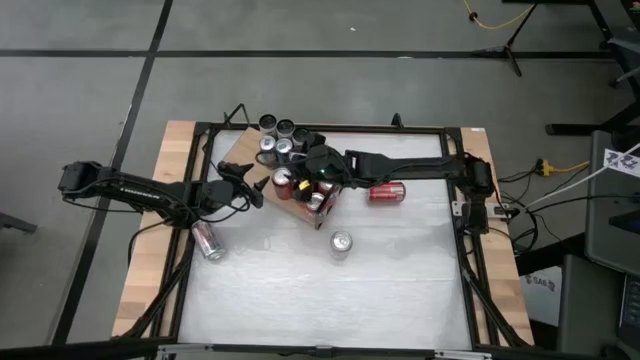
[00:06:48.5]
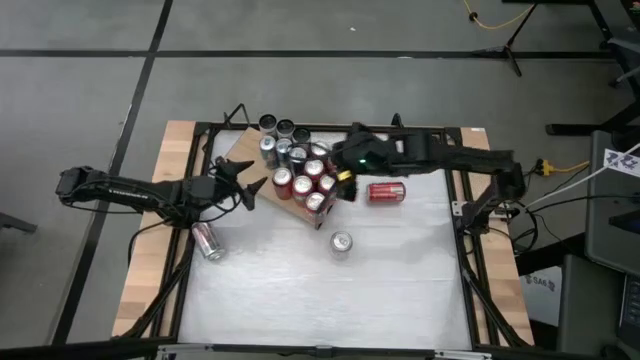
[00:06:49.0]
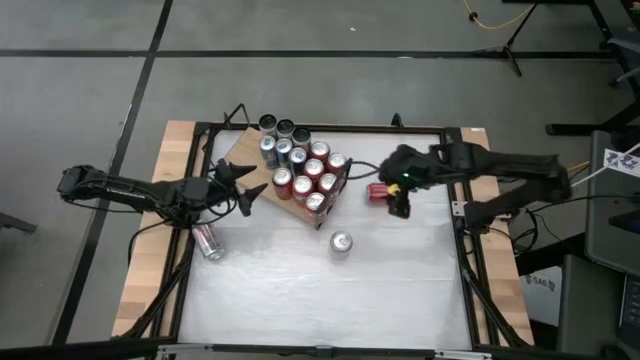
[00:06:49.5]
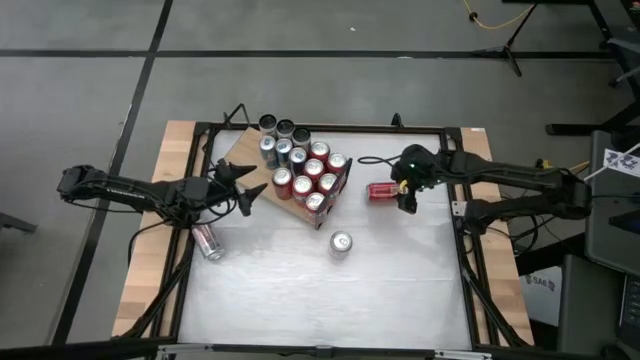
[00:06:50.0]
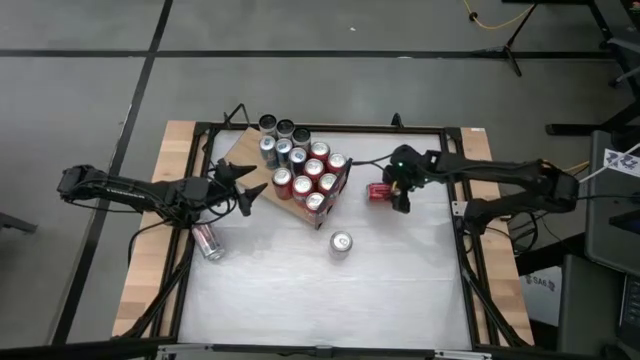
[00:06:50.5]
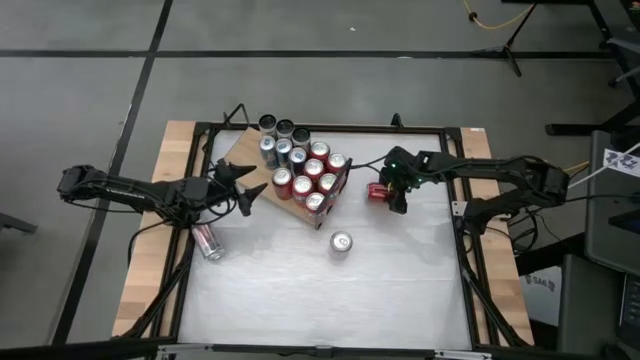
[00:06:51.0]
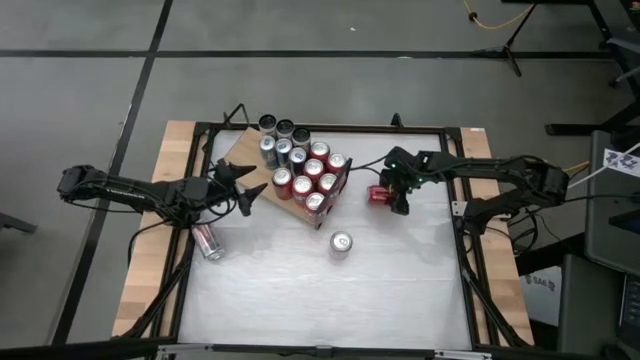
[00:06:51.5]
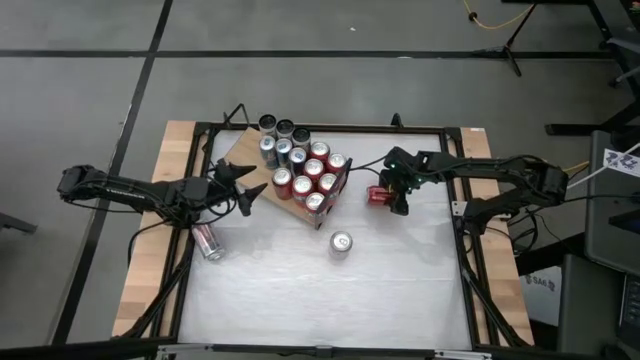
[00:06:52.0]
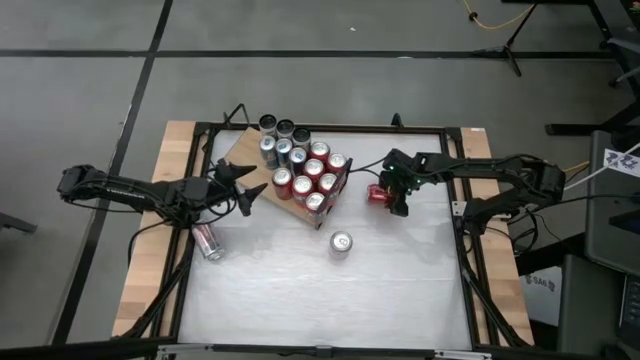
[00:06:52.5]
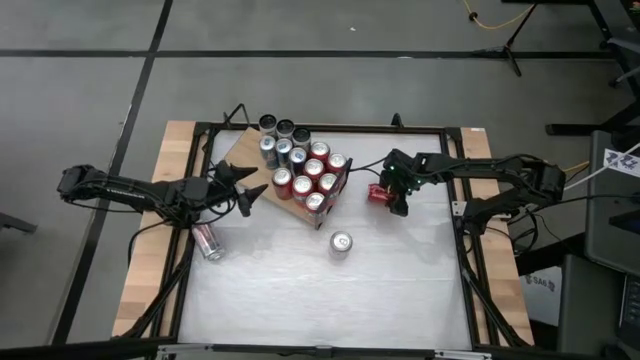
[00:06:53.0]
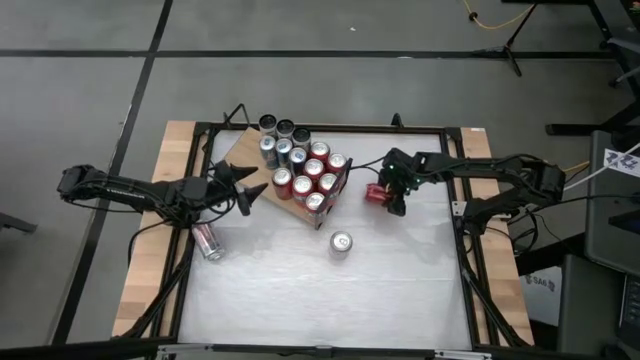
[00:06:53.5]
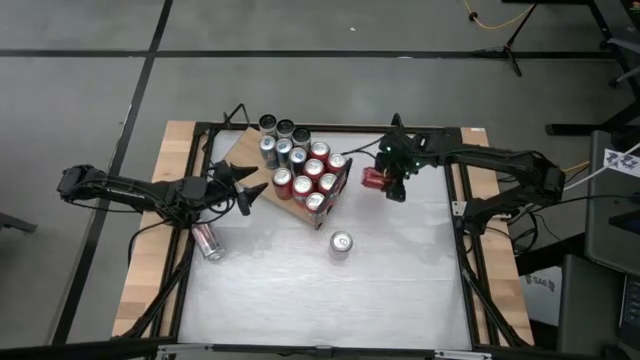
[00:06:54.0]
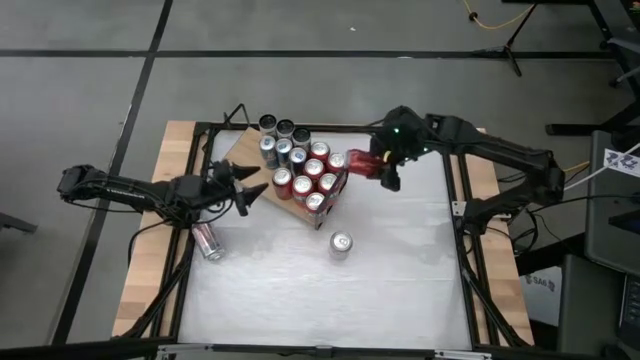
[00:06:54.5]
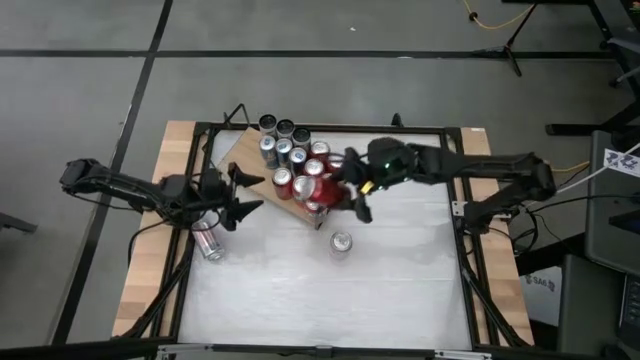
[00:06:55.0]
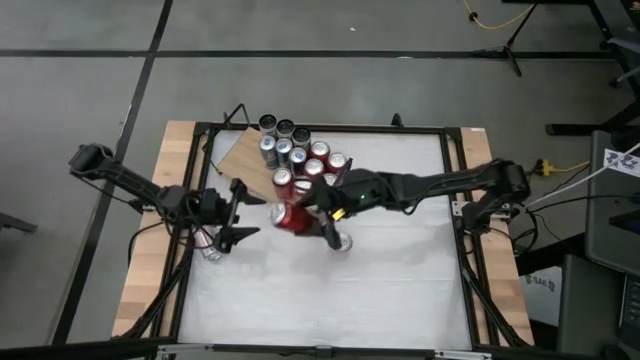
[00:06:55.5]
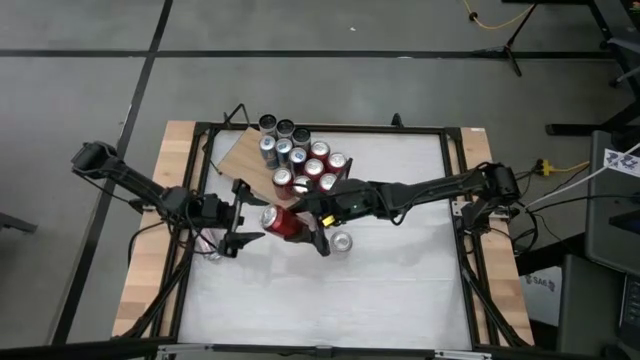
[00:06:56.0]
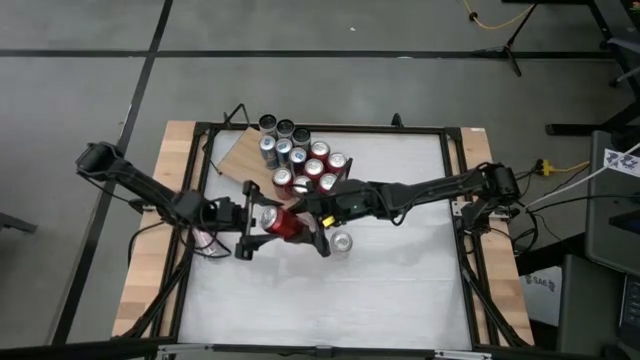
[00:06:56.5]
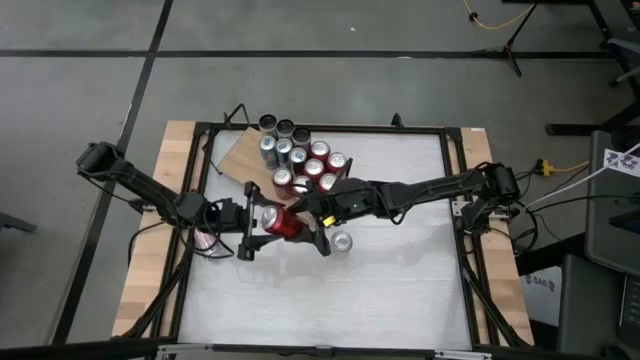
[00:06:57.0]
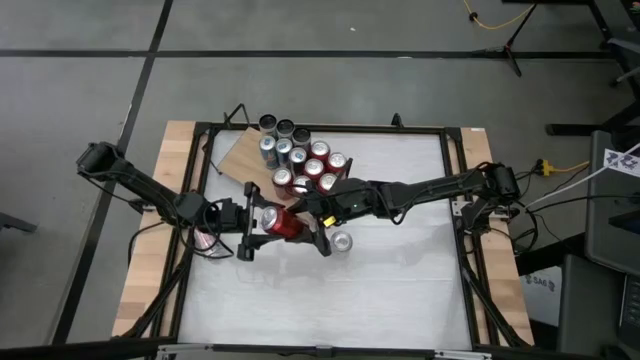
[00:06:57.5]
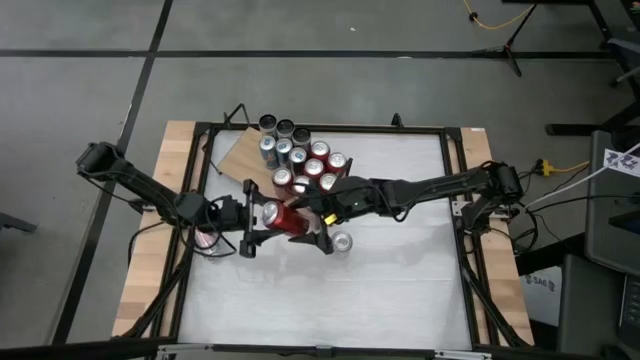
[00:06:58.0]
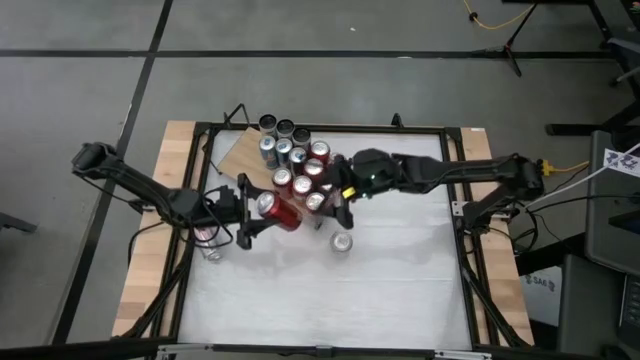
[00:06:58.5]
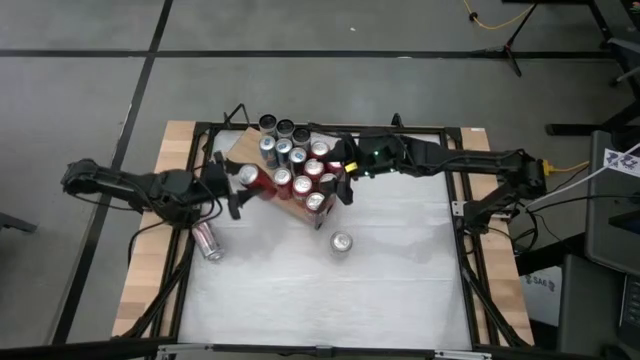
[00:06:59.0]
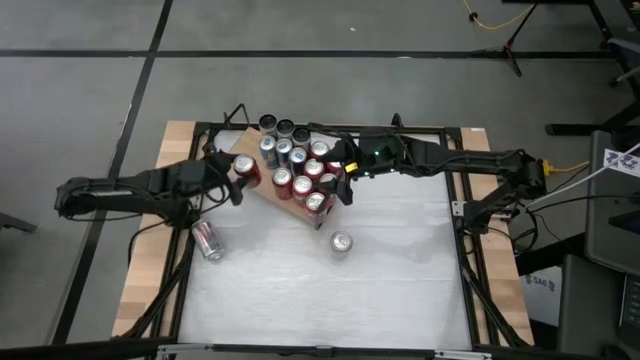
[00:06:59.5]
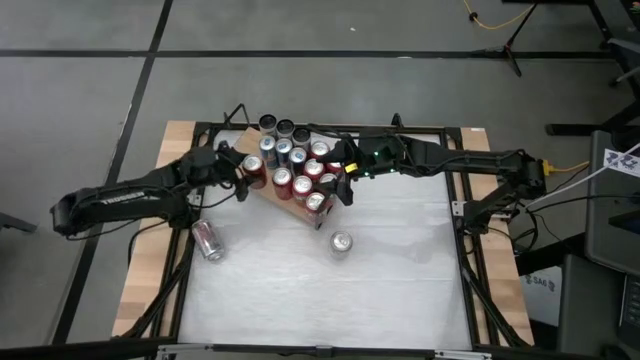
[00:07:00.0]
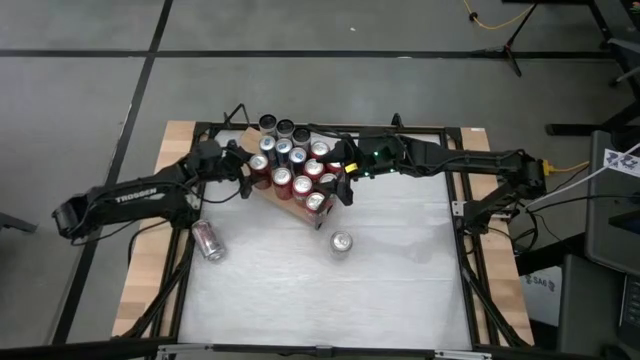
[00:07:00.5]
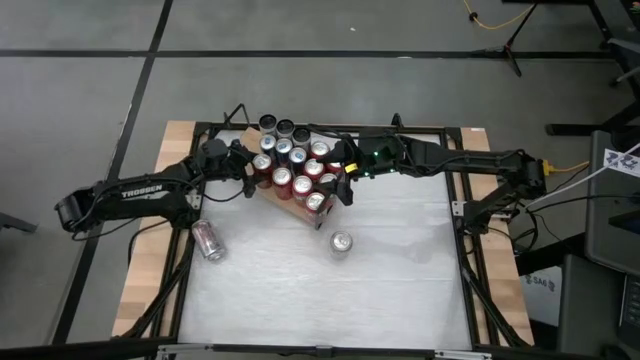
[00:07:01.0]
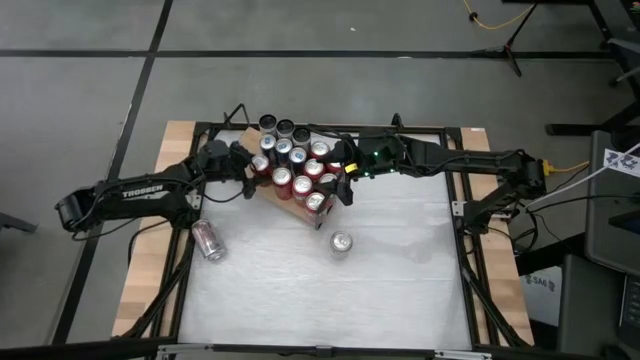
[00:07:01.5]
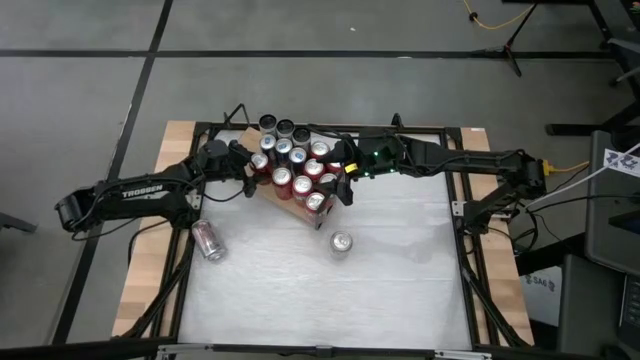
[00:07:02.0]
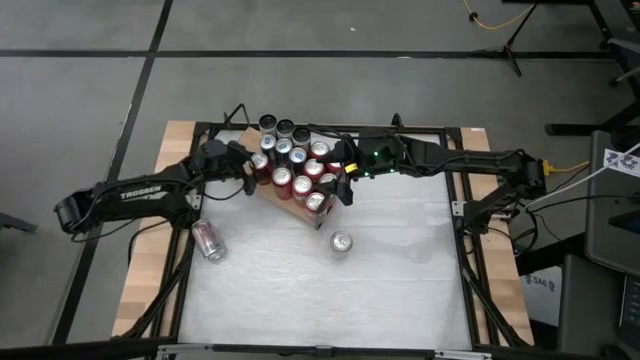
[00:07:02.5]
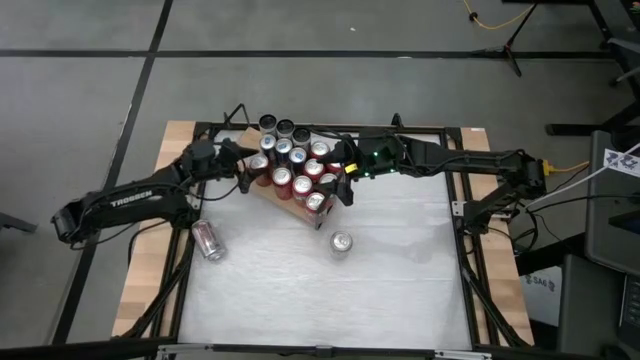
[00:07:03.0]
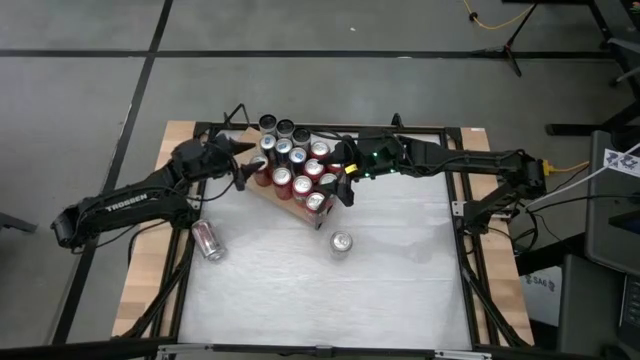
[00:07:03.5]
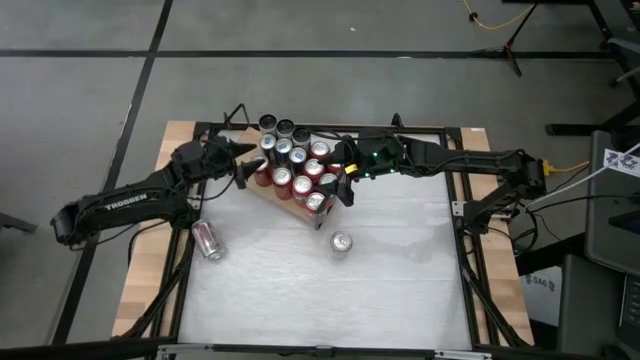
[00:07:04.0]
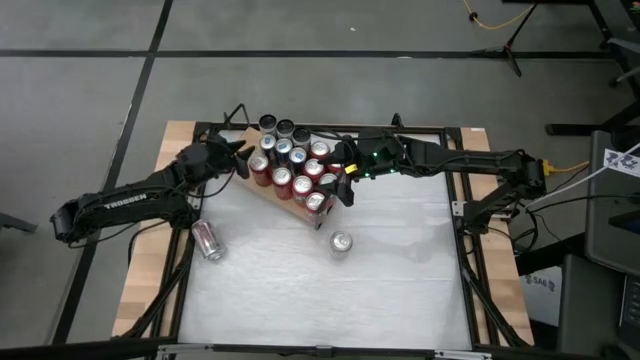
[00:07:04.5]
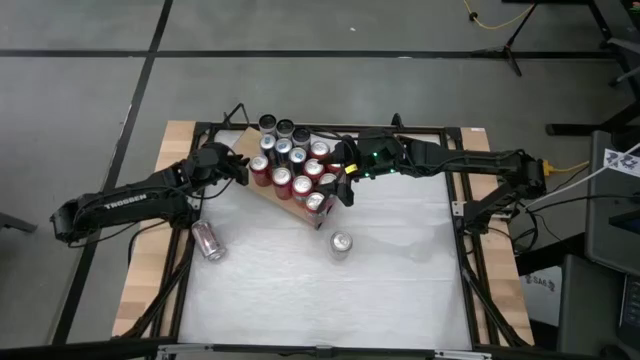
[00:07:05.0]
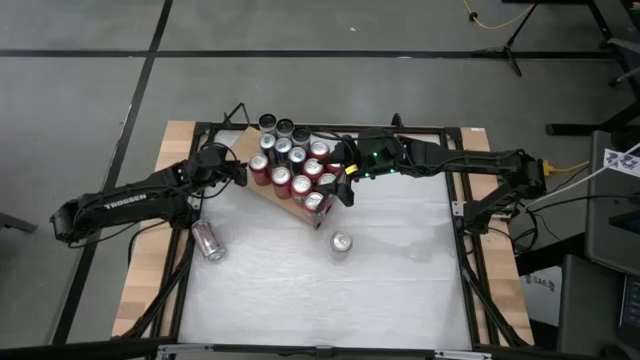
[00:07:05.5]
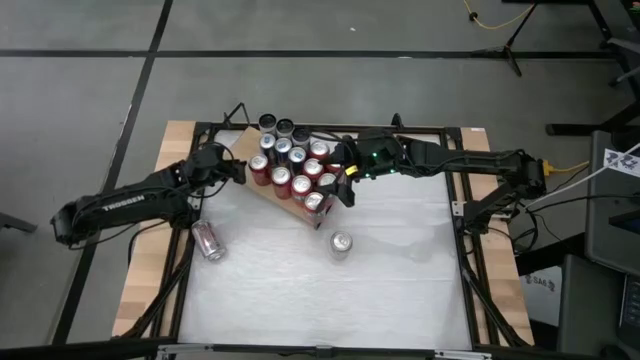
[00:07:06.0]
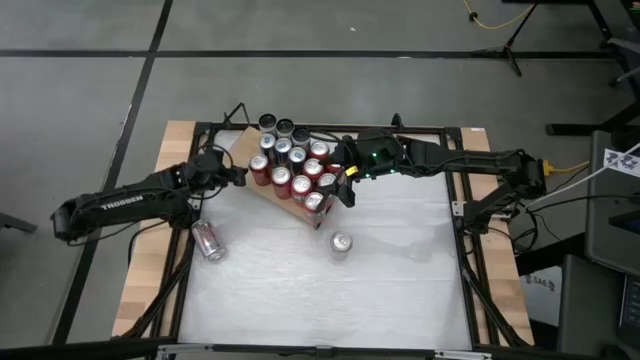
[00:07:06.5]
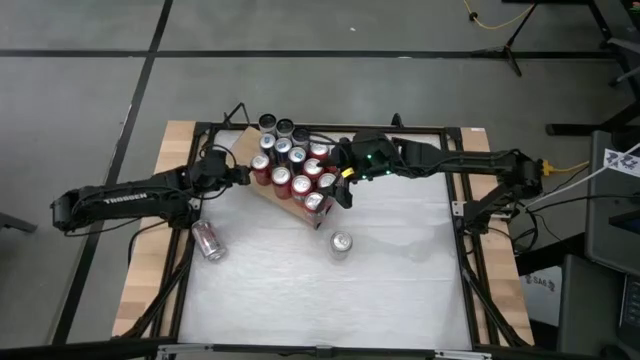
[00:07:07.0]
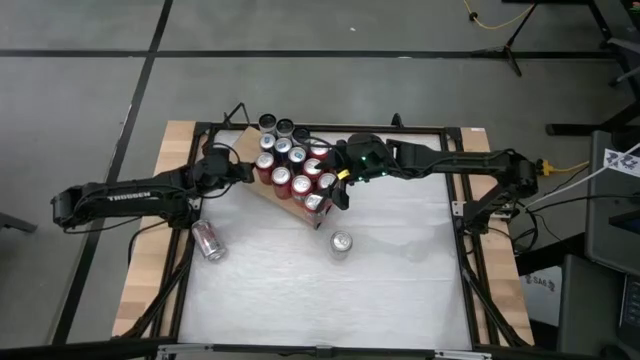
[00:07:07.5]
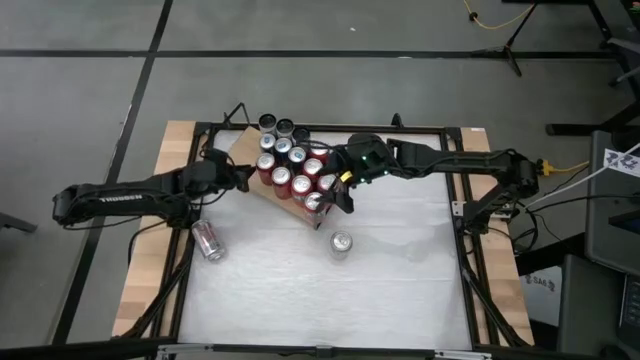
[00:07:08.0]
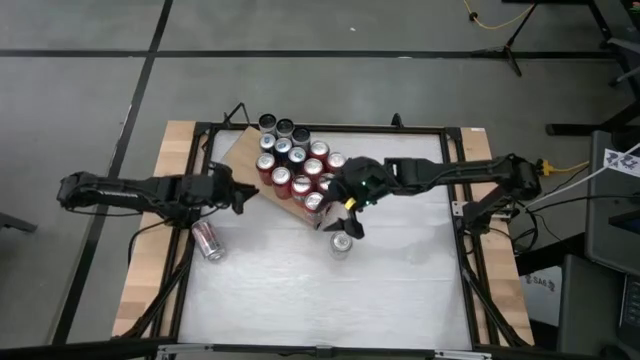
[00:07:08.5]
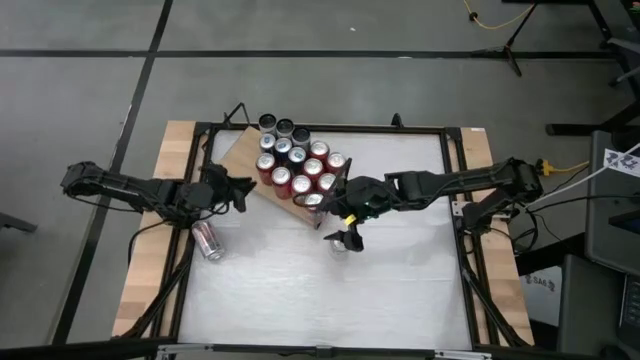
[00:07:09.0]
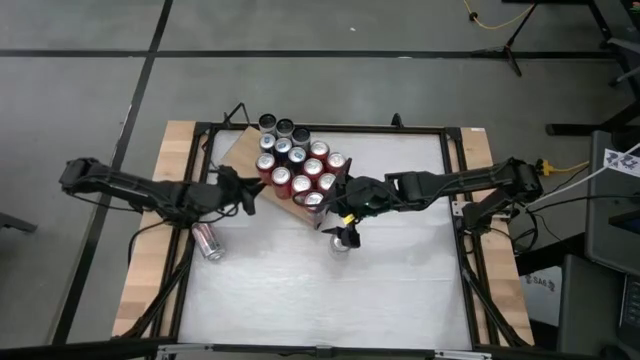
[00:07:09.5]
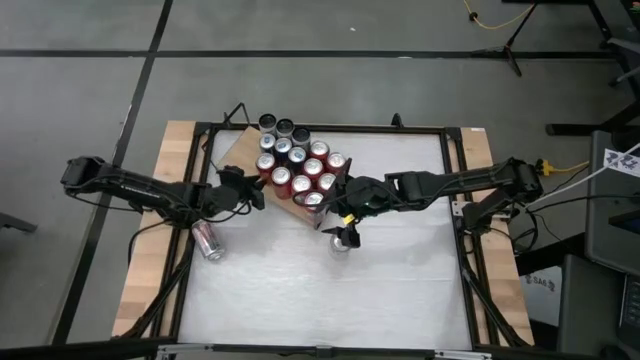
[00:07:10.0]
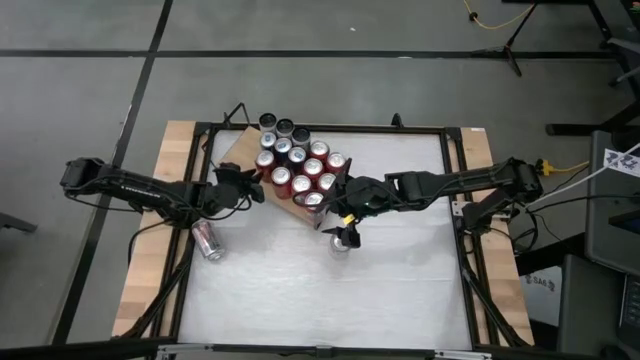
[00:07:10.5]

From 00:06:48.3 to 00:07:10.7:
Task: Pick and place cans onto a shelf
Put the red/black soda can on the shelf aligned with the other red/black soda cans
